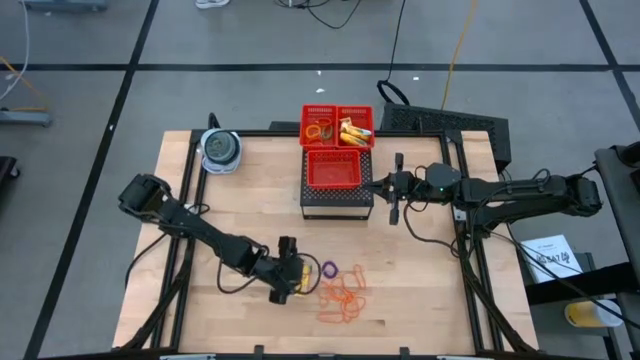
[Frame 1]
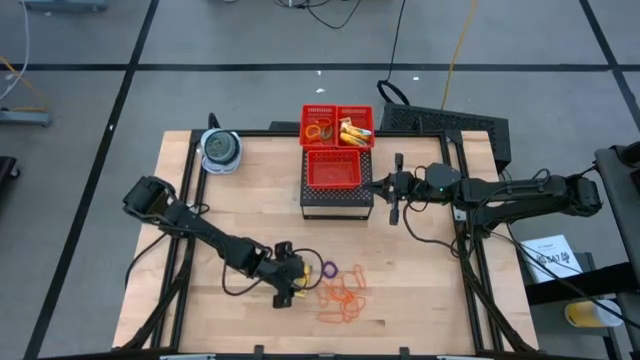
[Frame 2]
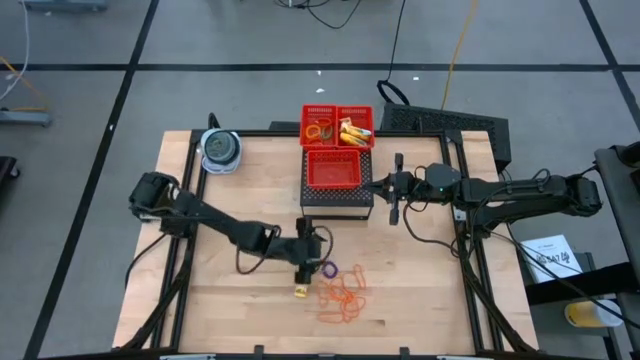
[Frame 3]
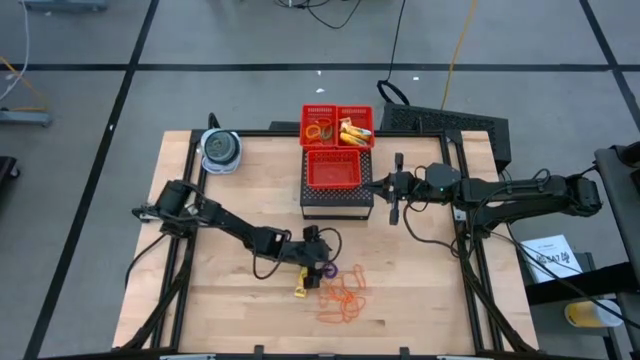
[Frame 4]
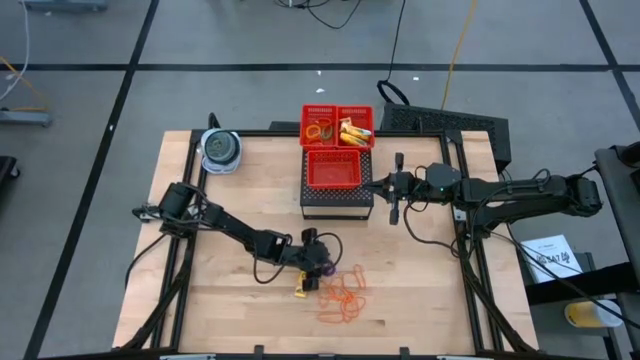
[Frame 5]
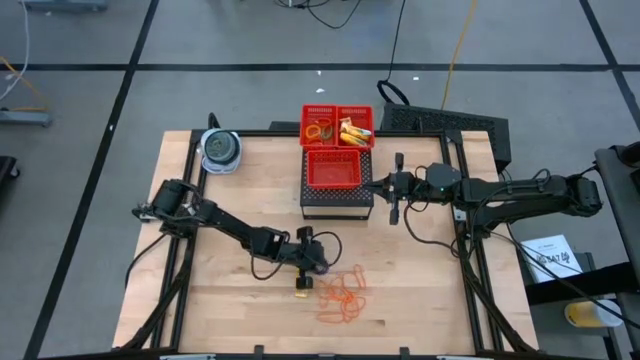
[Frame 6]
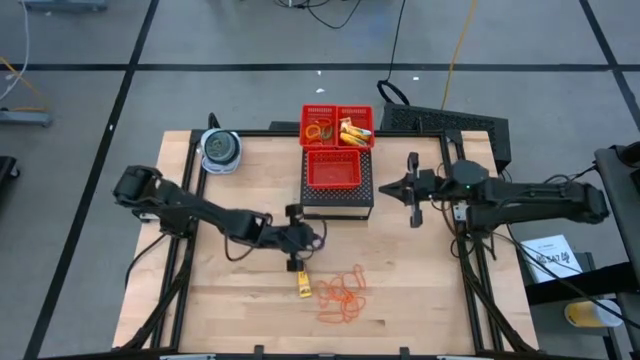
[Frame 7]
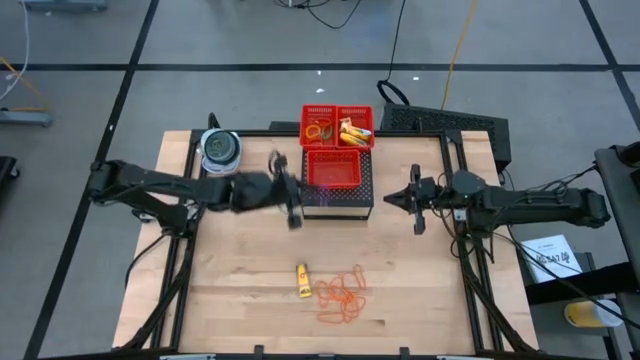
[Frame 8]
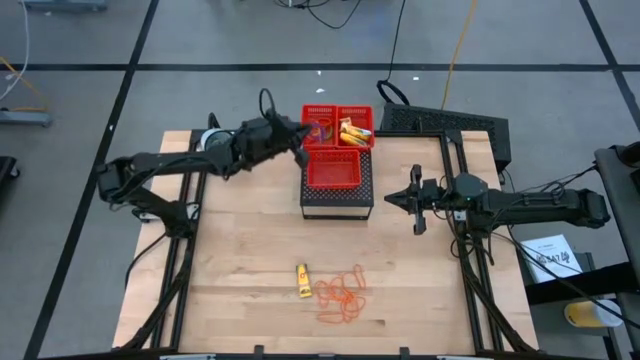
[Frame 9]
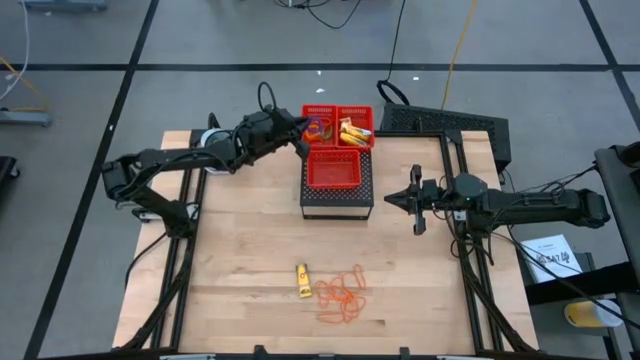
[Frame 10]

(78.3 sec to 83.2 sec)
Task: Pick & Place Office Desk Supplies
Put the violet spring keychain in the top left red bin on the shelf

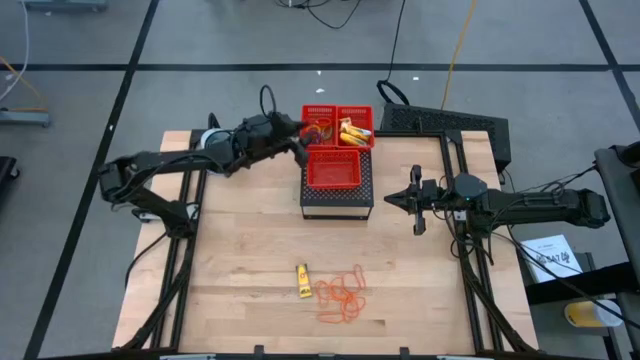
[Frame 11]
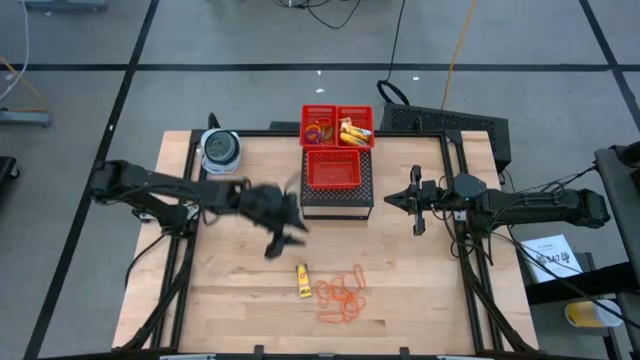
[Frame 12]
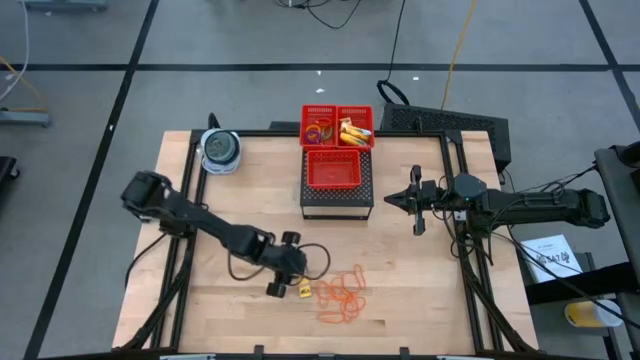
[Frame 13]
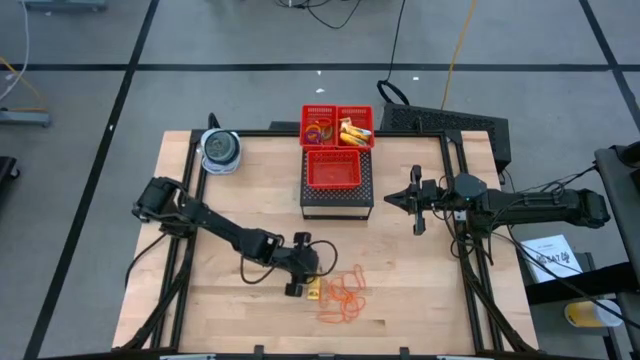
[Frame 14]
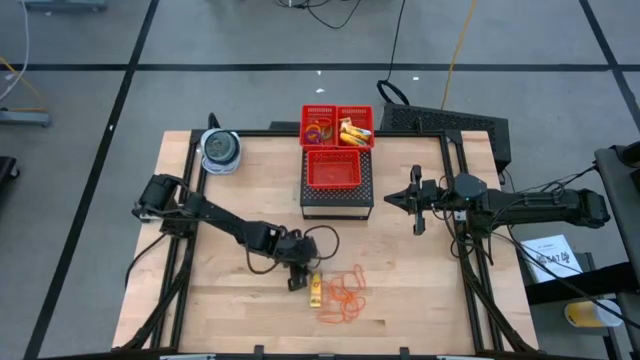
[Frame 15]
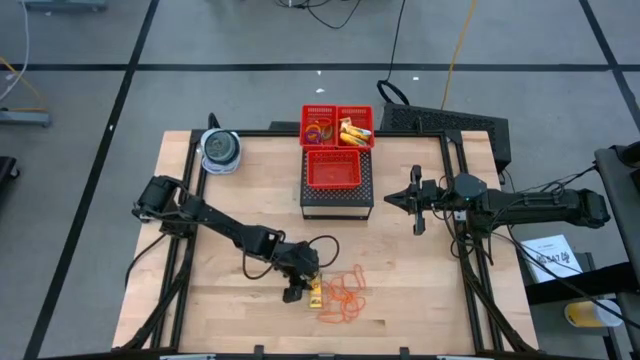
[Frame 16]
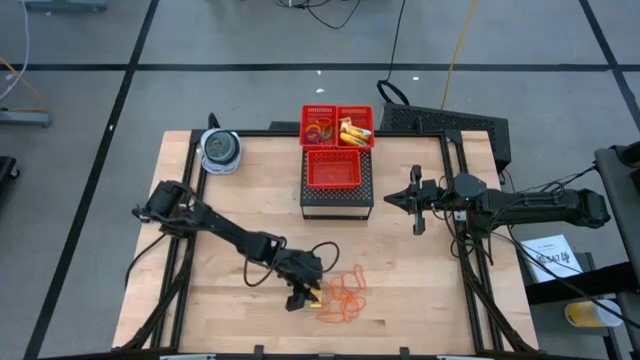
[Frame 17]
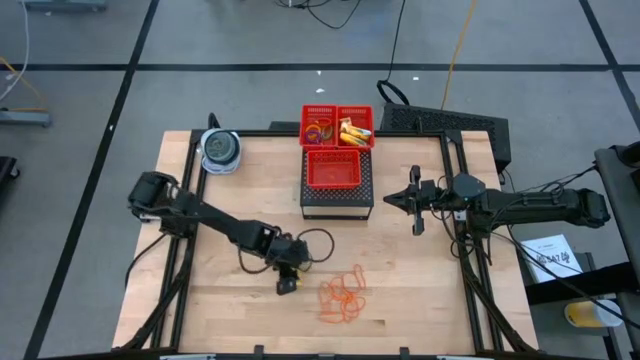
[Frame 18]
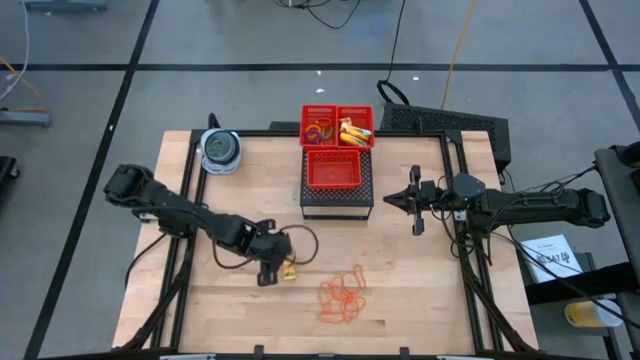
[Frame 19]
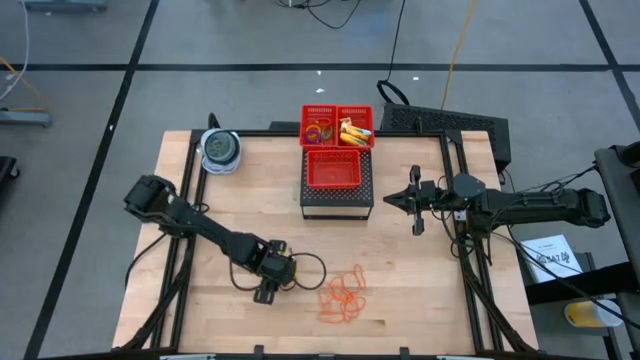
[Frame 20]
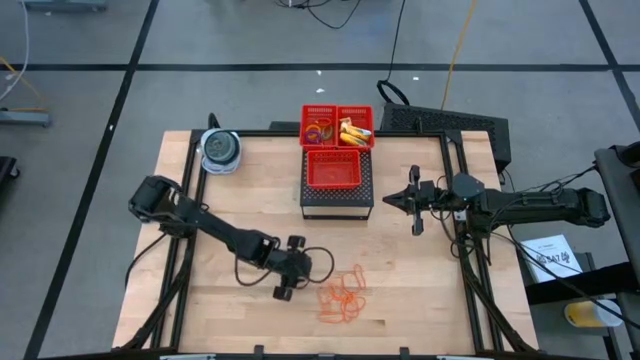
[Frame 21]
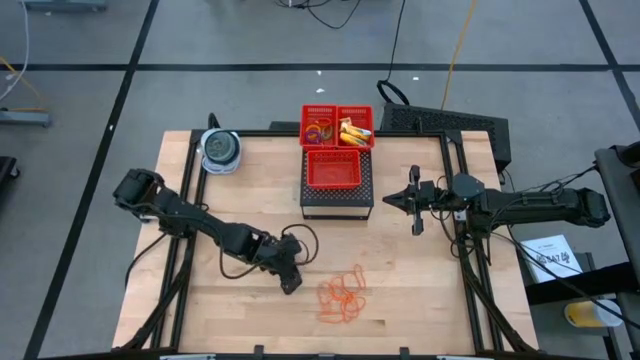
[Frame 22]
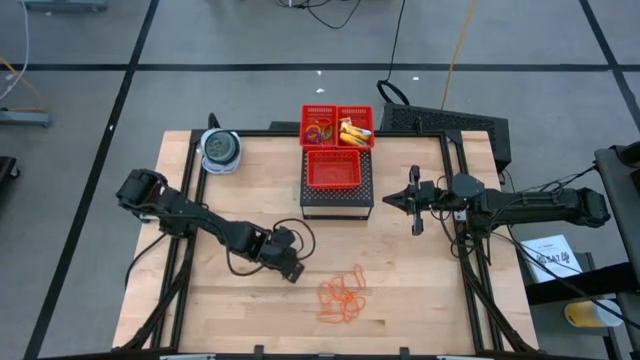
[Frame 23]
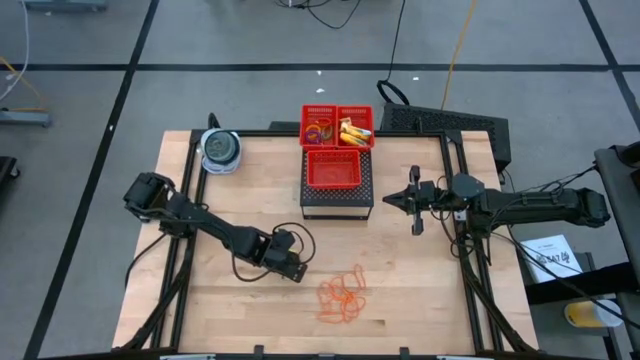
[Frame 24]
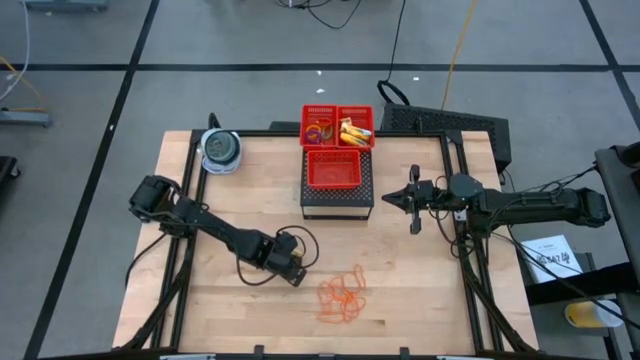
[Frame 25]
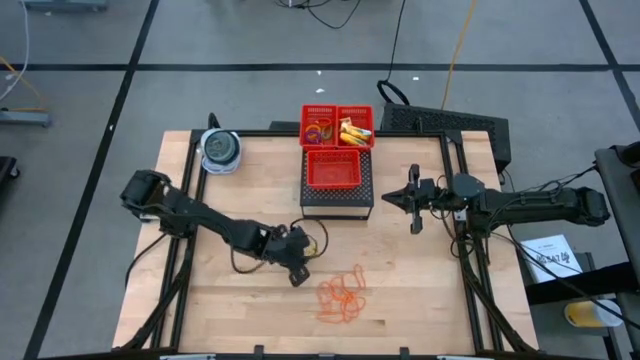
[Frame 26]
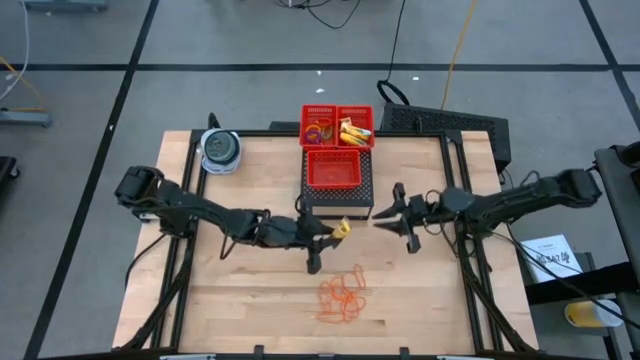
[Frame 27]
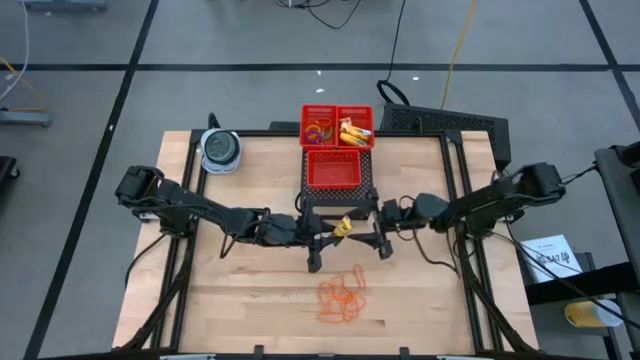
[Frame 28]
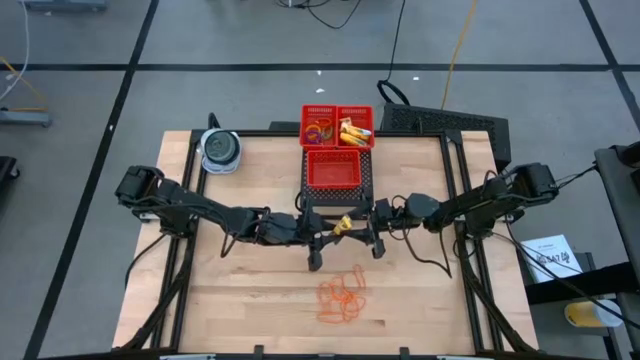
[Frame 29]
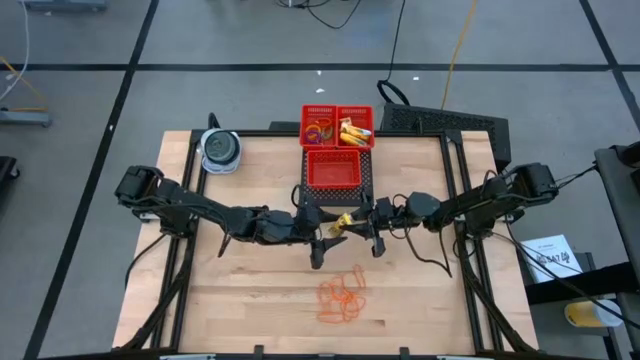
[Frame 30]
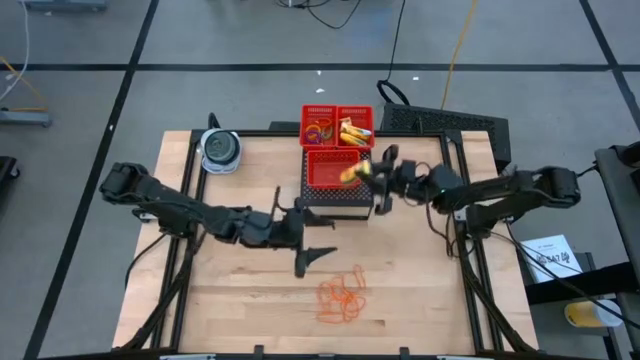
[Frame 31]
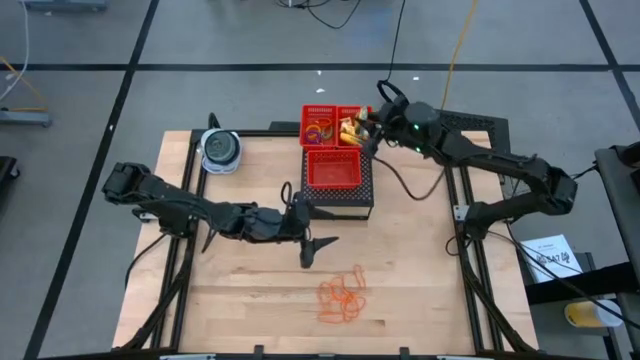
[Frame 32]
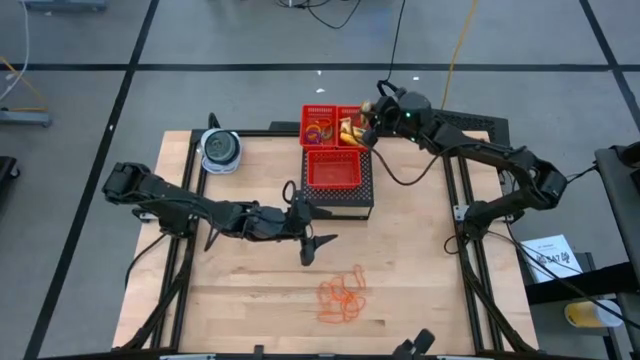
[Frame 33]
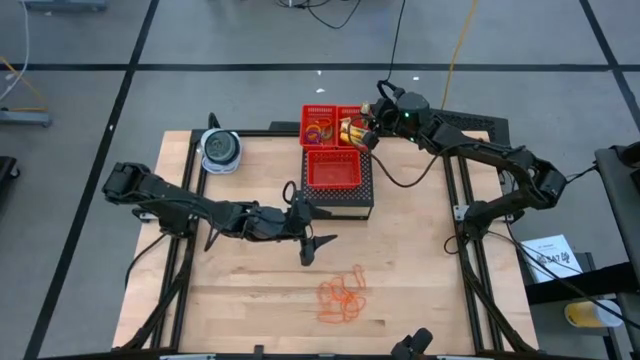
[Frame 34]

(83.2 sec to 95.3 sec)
Put the yellow pack of crayon in the top right red bin on the shelf

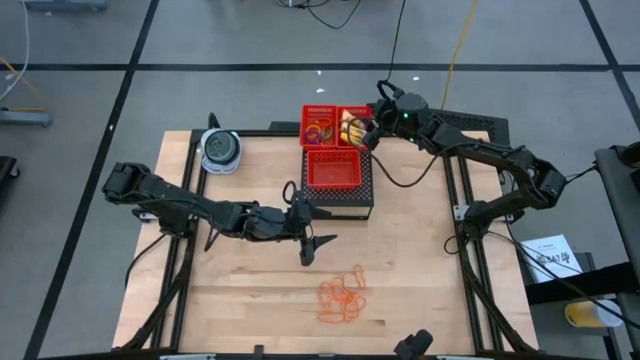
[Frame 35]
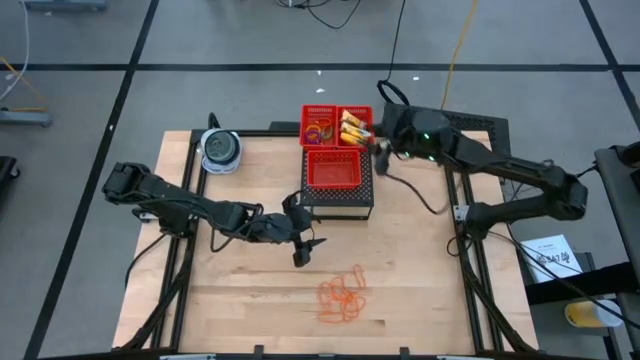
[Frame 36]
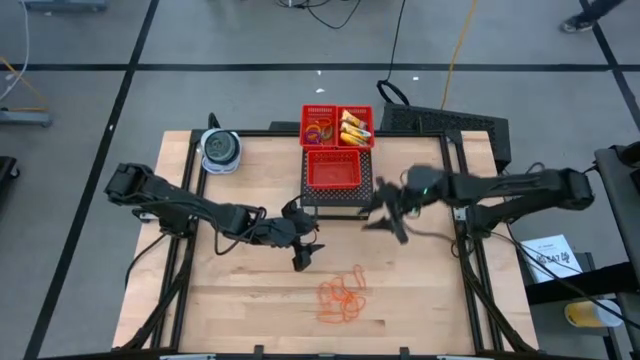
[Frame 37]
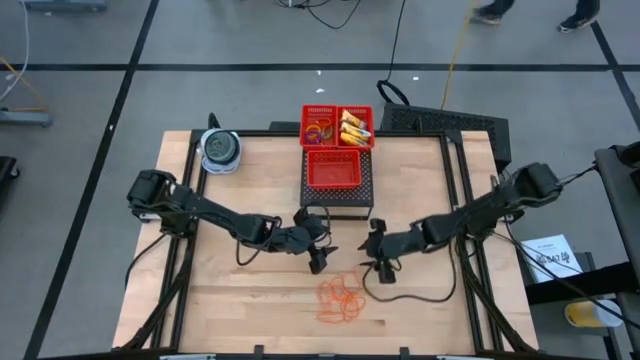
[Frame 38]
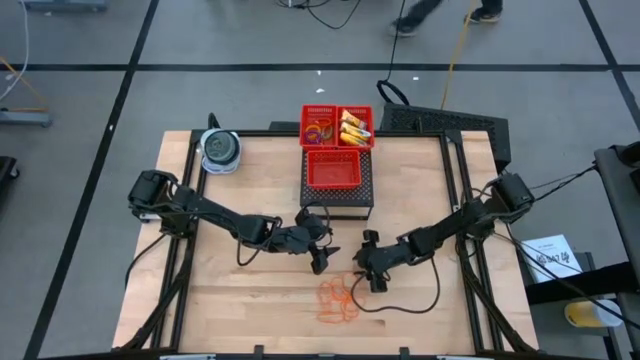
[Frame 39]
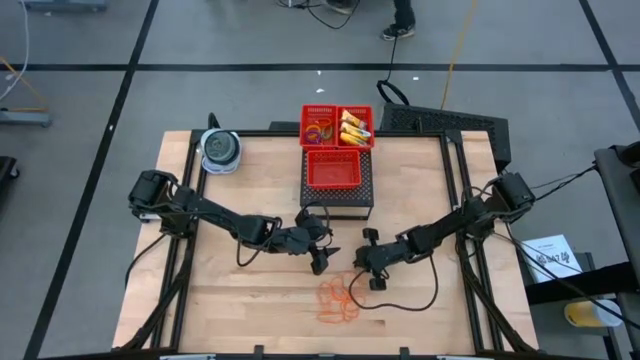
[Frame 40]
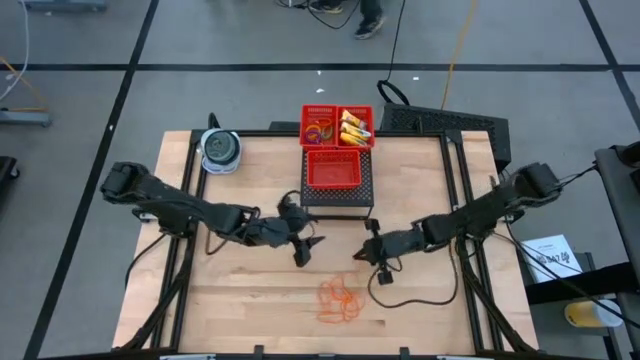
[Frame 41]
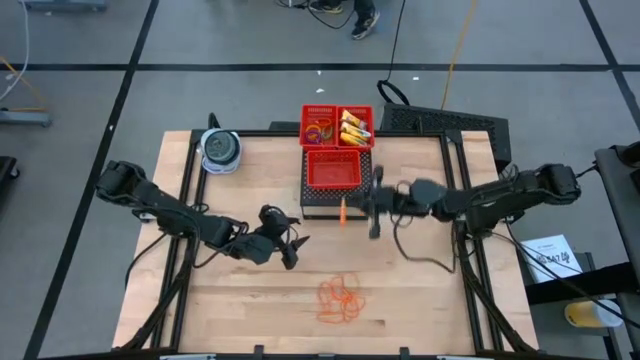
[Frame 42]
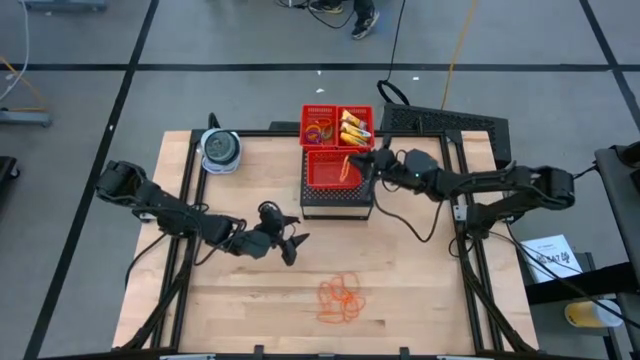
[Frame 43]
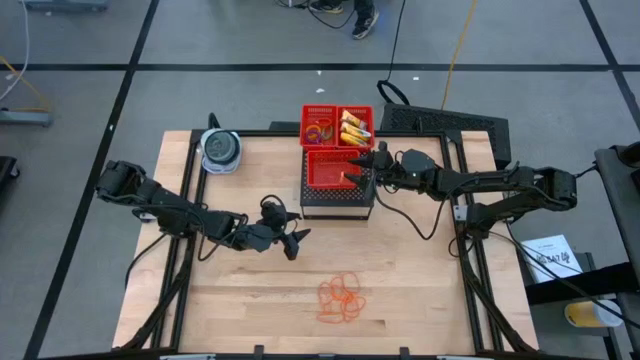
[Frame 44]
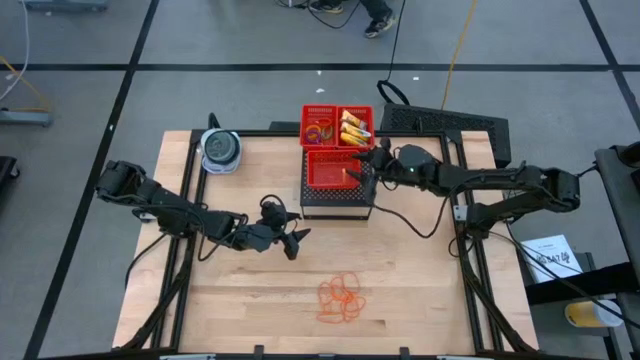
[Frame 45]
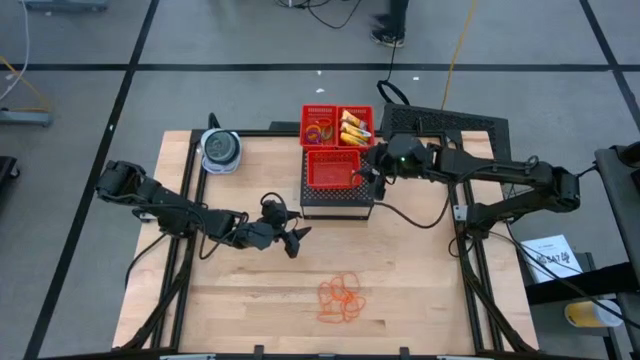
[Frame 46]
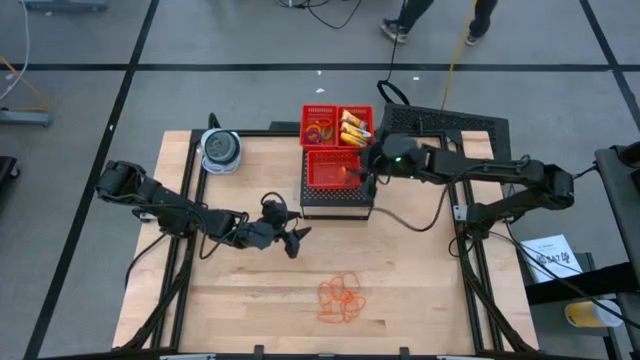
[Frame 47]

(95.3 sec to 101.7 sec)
Put the orange rubber band in the bottom red bin on the shelf
